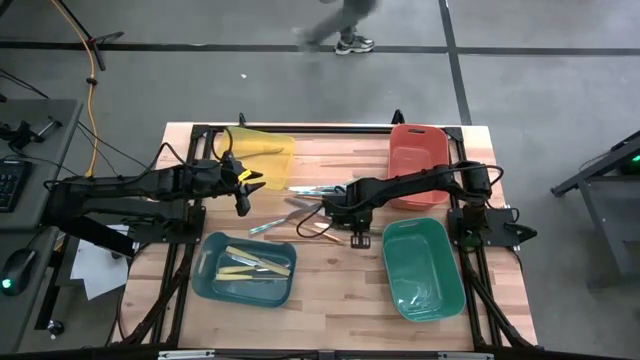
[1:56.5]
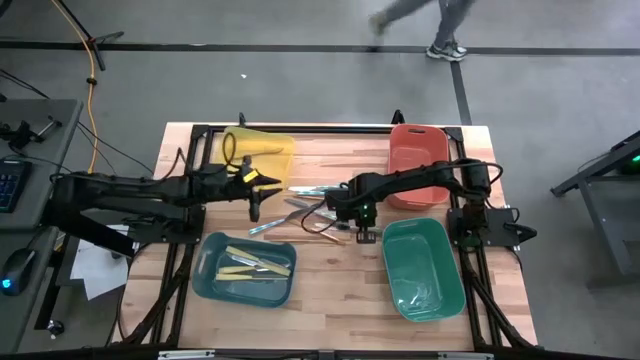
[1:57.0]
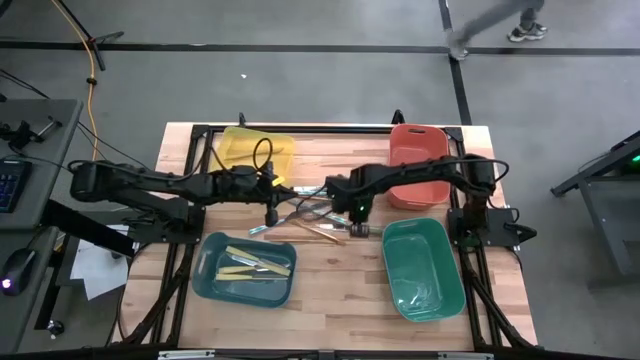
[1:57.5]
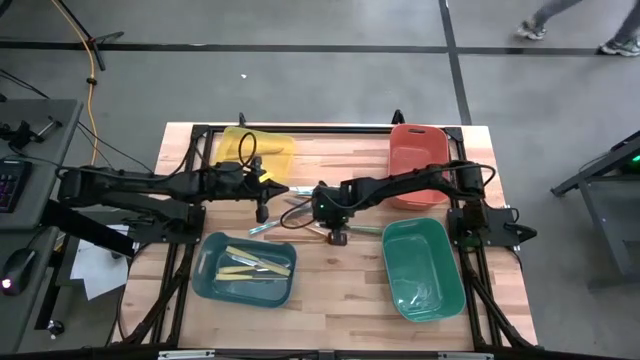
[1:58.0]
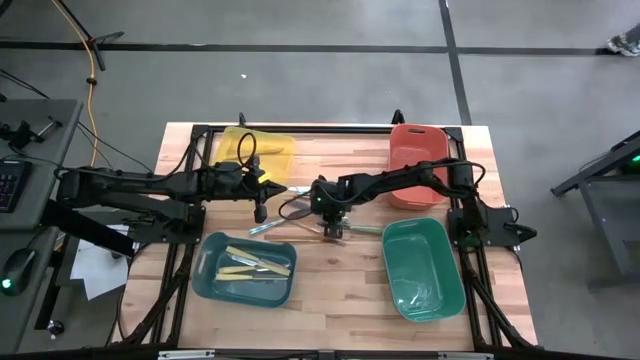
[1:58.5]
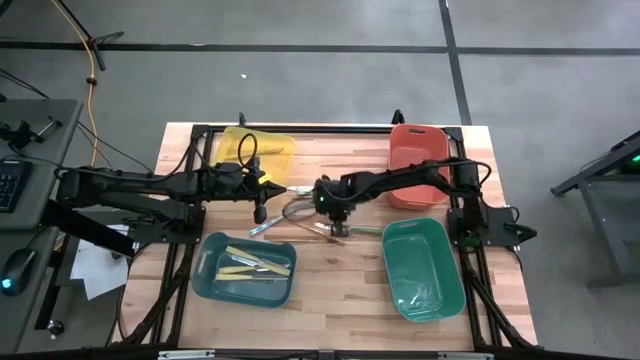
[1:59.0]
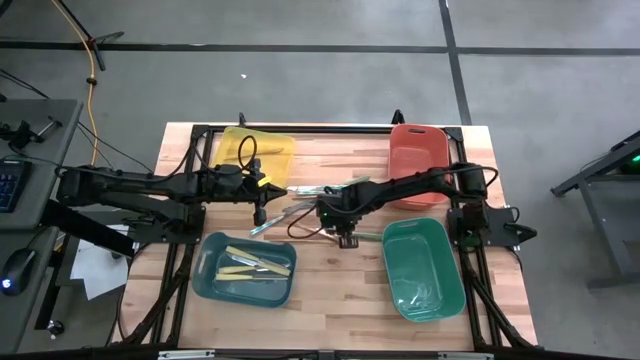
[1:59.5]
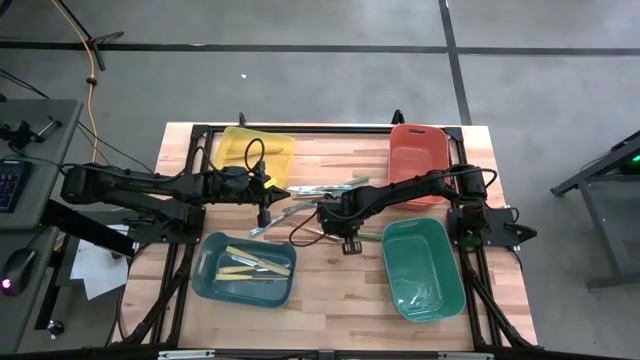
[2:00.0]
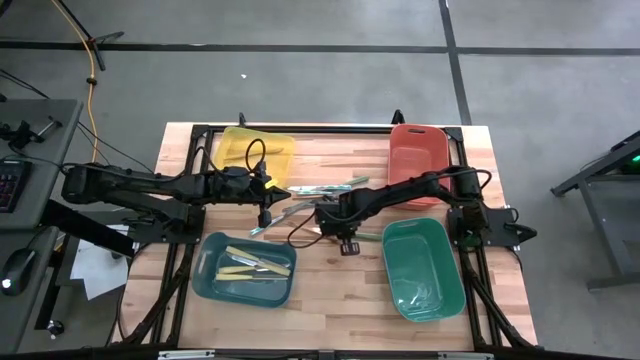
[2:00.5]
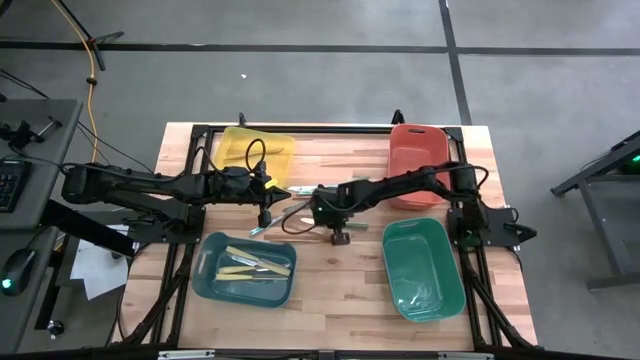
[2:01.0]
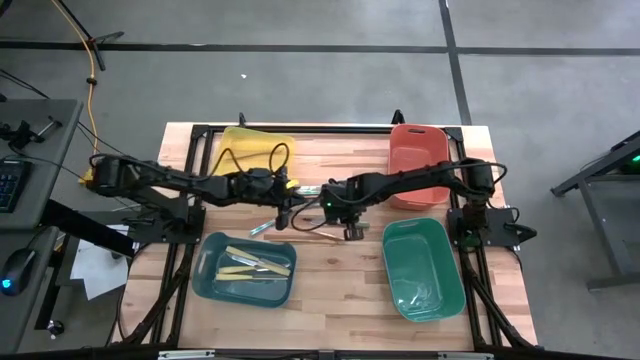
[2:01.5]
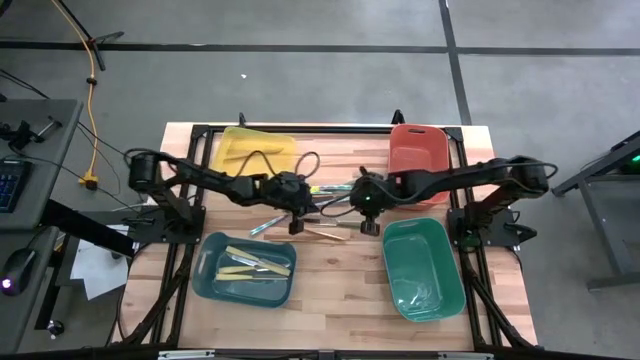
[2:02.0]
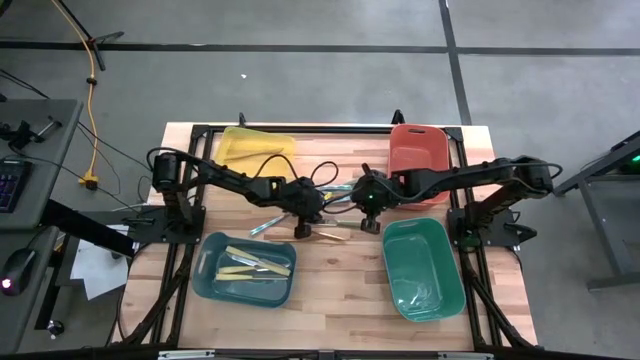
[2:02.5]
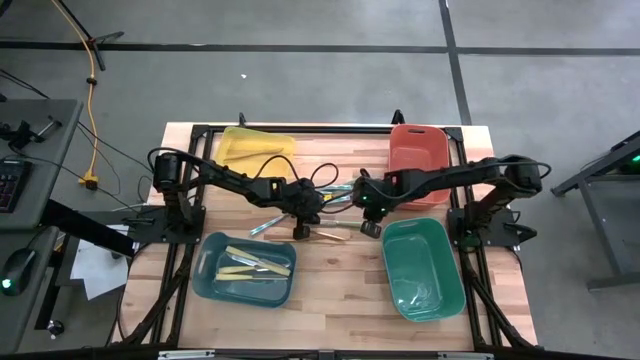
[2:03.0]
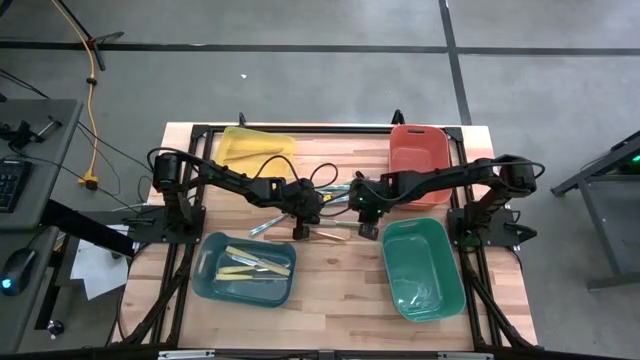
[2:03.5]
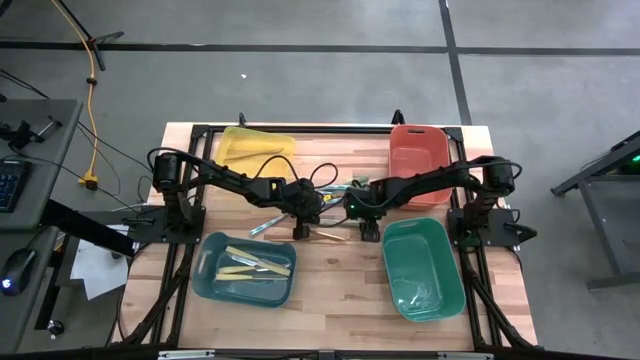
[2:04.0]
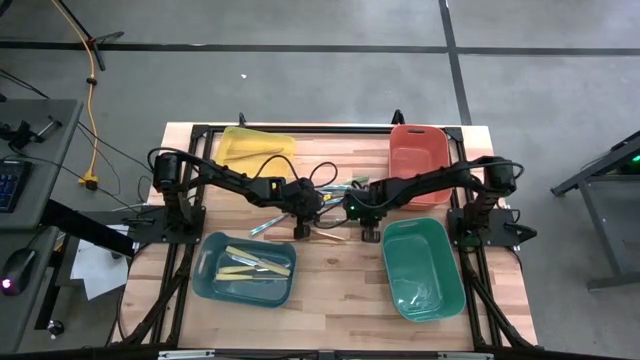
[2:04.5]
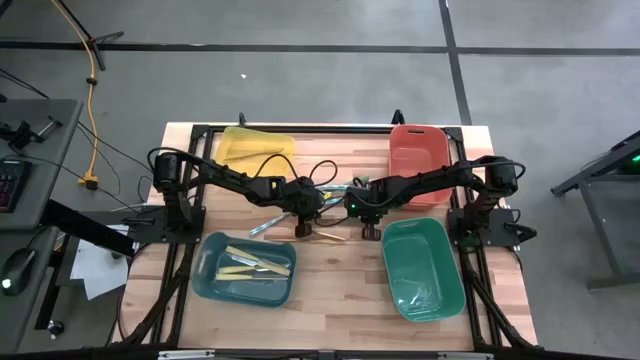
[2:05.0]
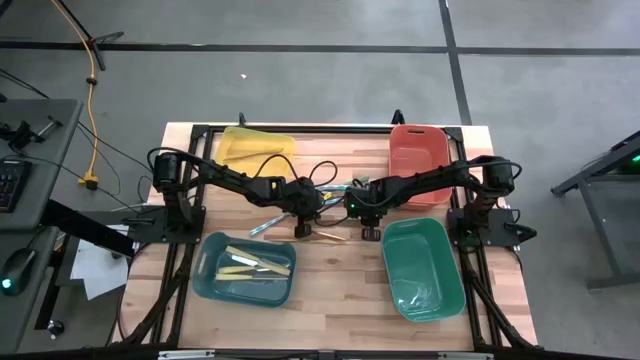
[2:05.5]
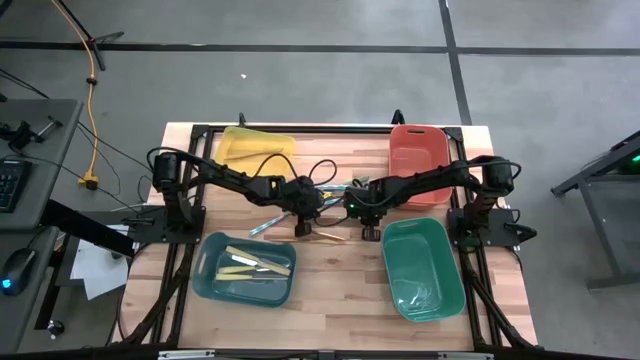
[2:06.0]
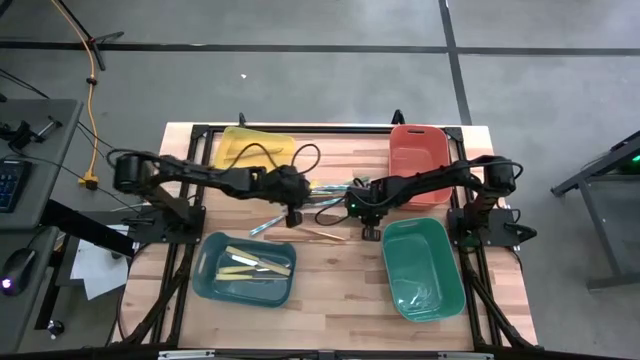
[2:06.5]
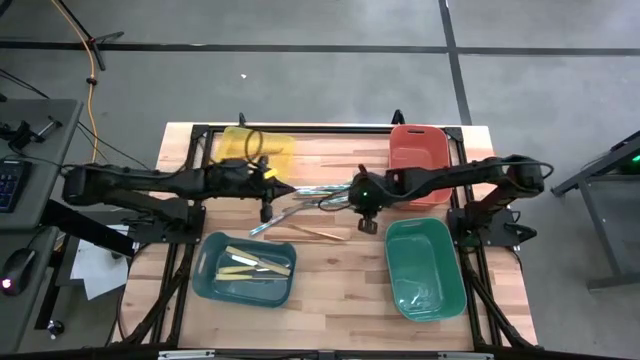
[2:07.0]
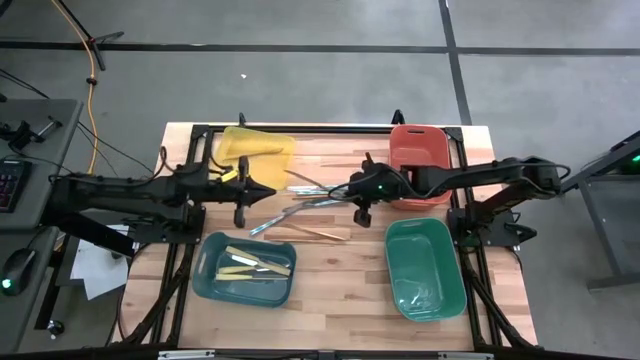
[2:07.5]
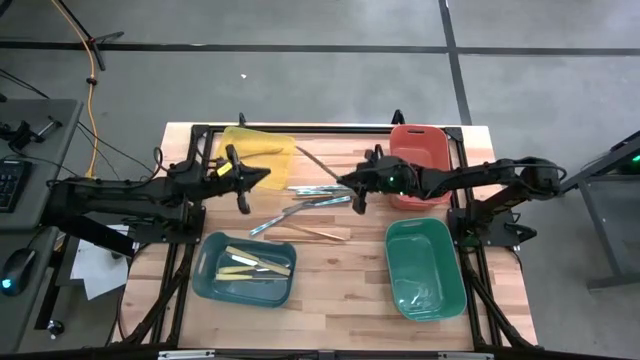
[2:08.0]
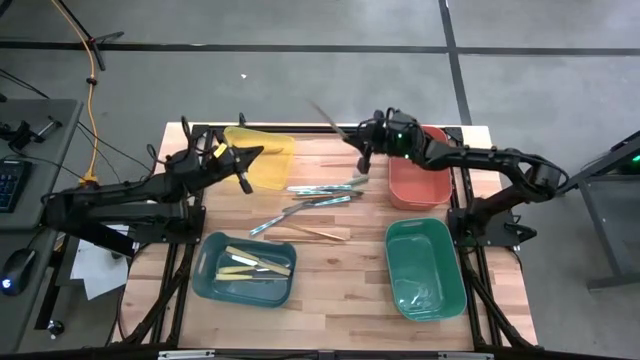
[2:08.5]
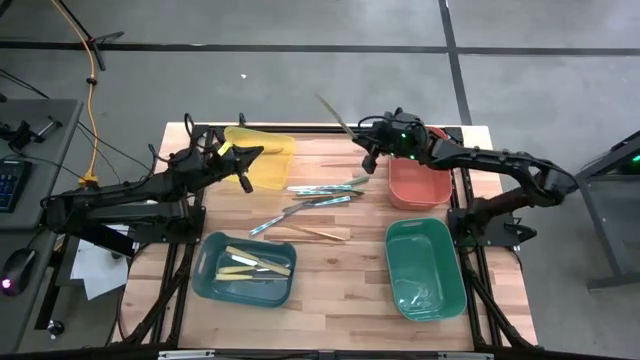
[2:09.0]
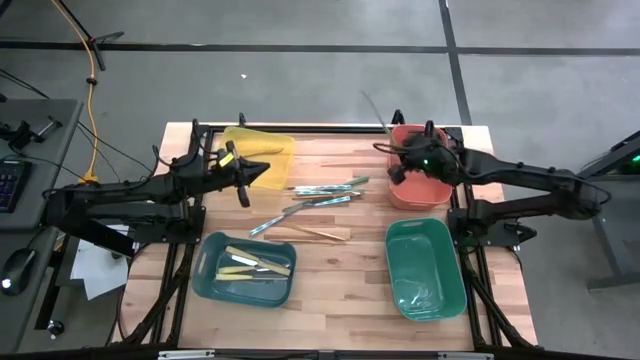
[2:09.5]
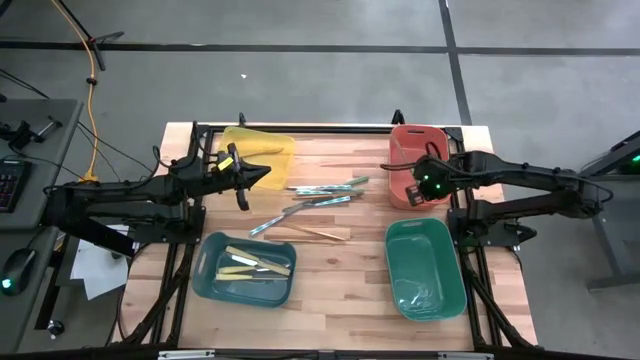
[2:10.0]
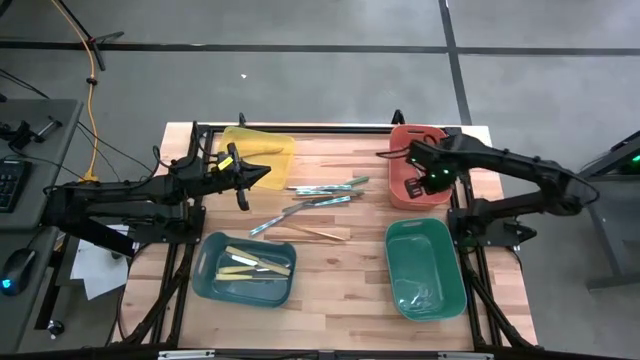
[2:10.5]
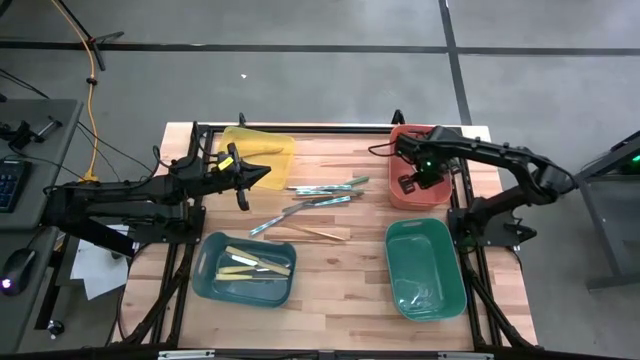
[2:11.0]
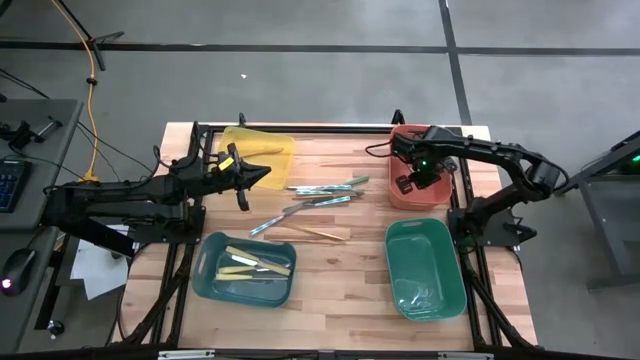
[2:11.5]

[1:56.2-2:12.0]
Task: Sort silverware by color (type)
Put the green knife into the orange bin

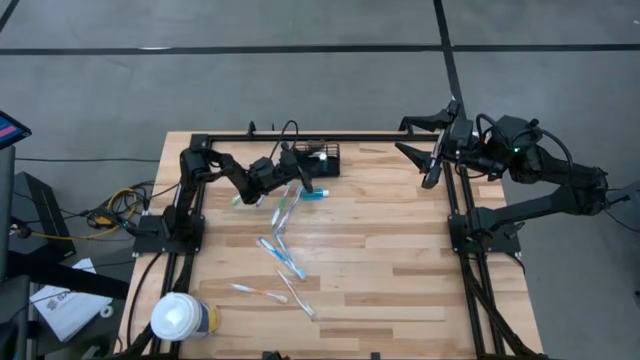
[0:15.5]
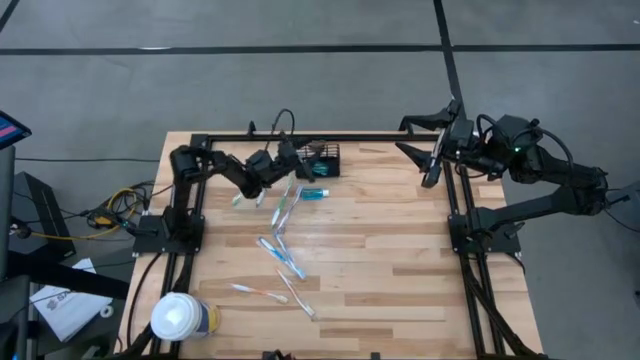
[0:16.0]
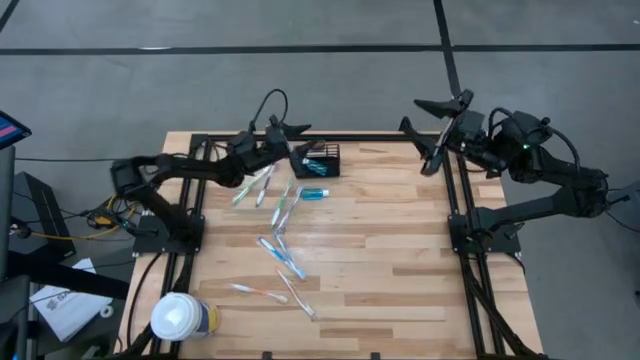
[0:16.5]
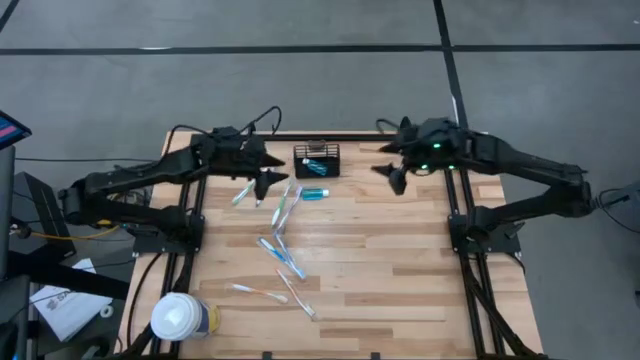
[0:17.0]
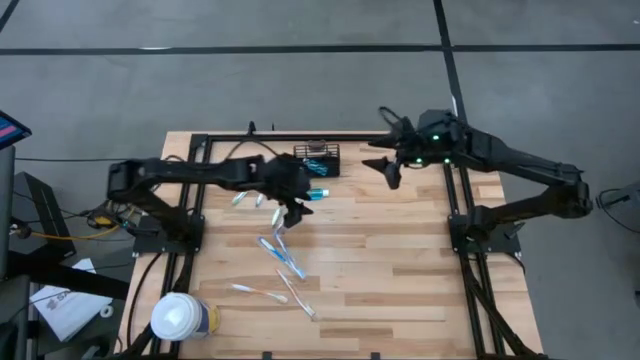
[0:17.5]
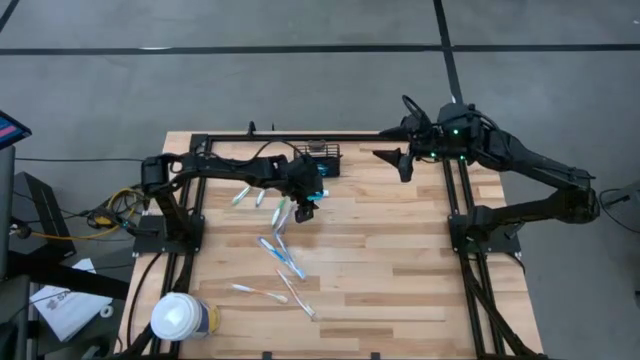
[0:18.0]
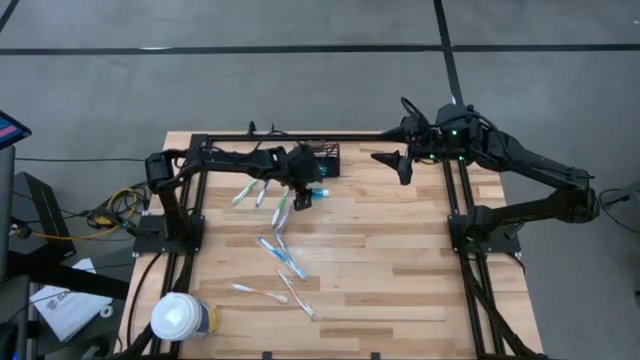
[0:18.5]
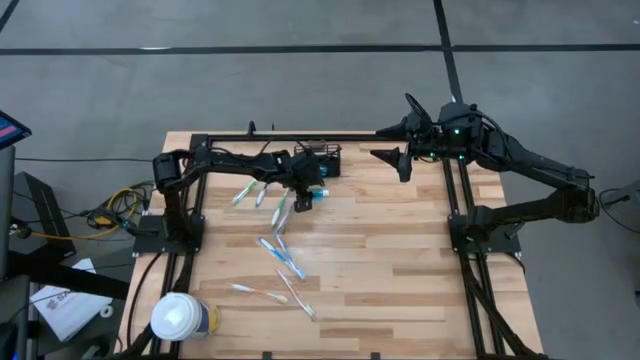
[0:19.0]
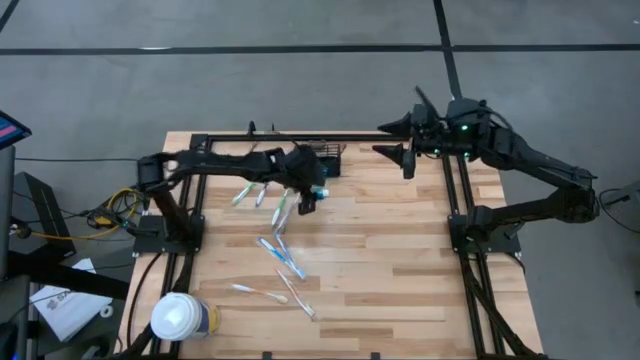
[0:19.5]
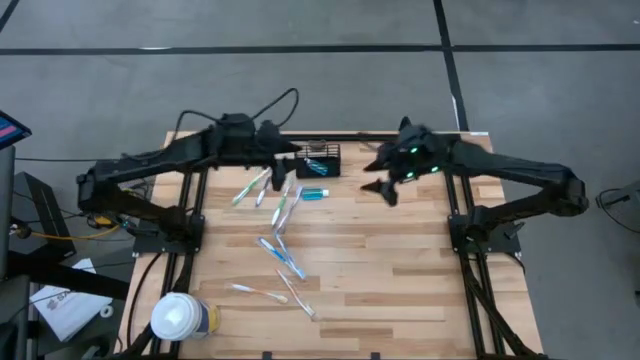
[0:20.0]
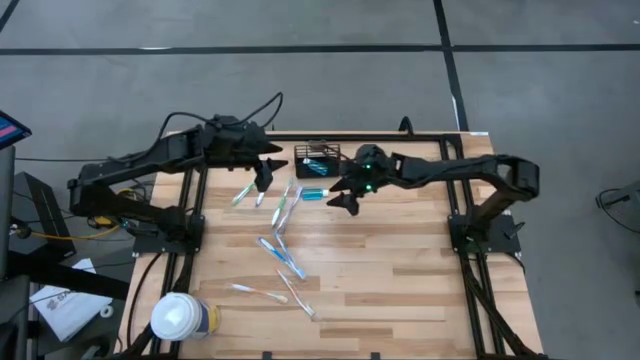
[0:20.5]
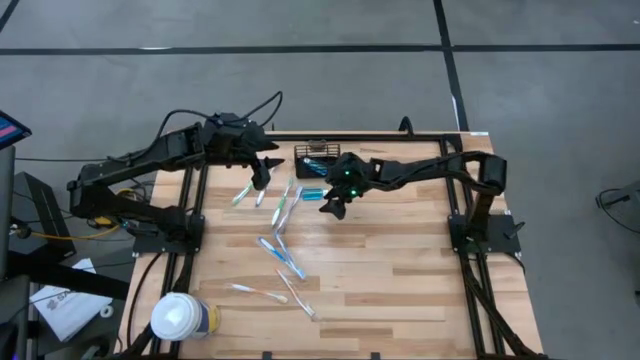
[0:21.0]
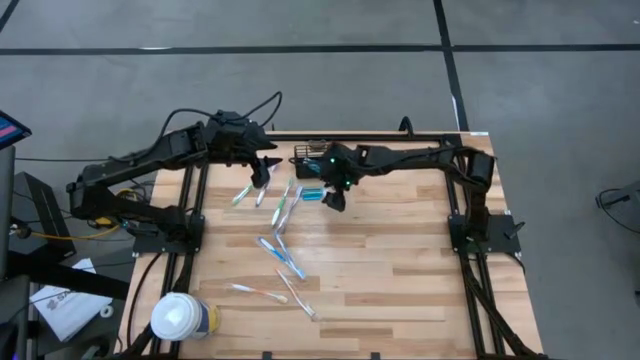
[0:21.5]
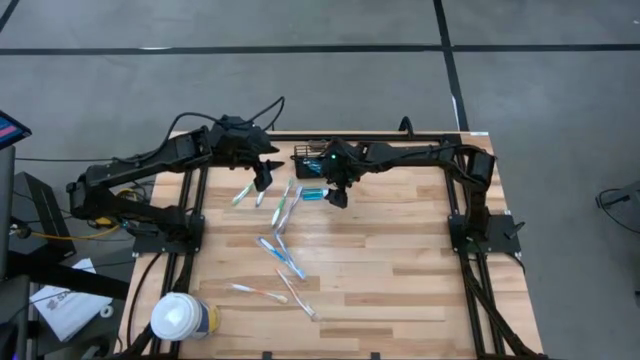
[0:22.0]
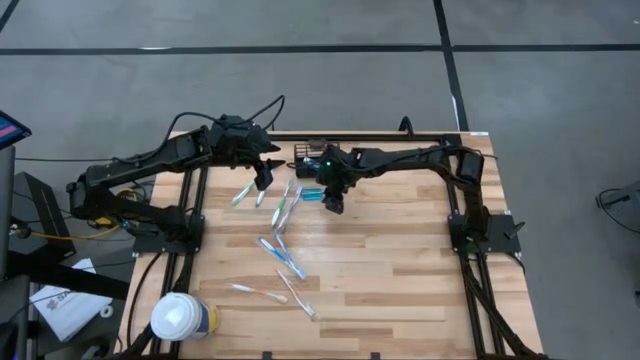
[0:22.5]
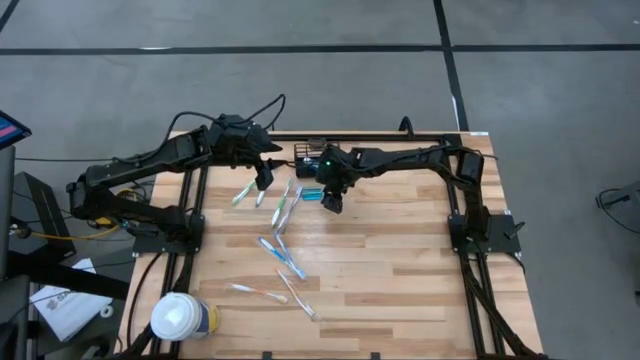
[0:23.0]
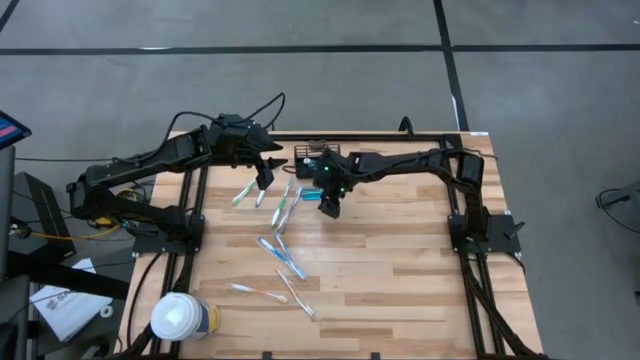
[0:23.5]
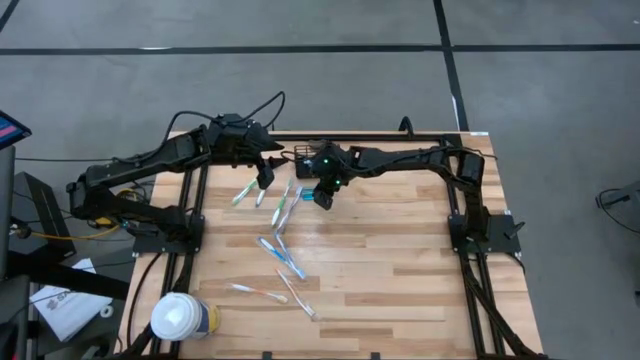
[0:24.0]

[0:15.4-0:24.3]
Task: Pick & Place toothbrushing station
Put the blue mouthwash into the black wire organizer
